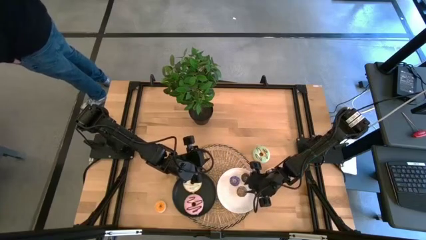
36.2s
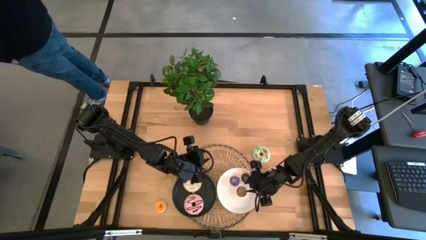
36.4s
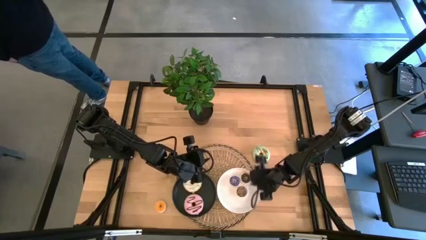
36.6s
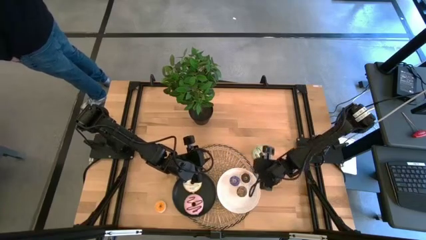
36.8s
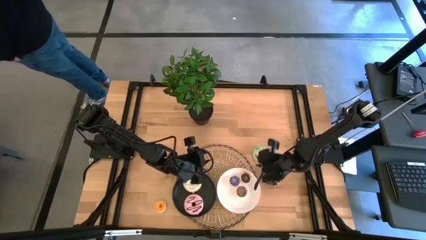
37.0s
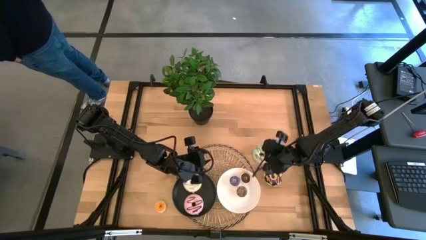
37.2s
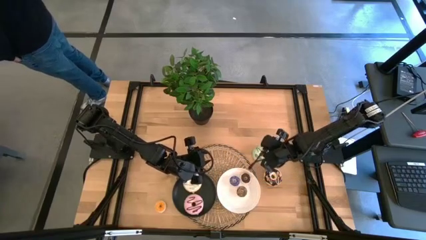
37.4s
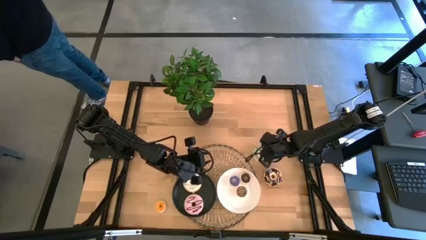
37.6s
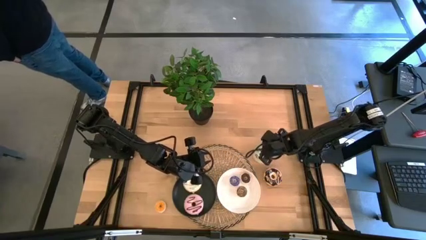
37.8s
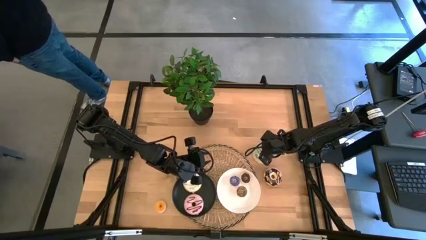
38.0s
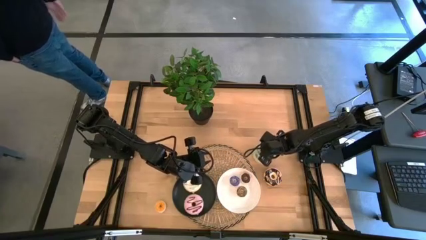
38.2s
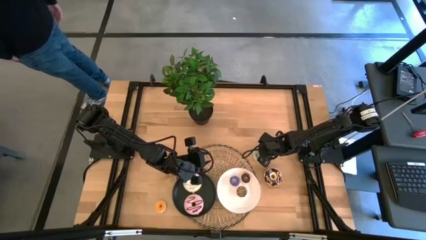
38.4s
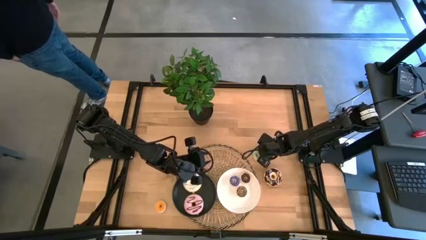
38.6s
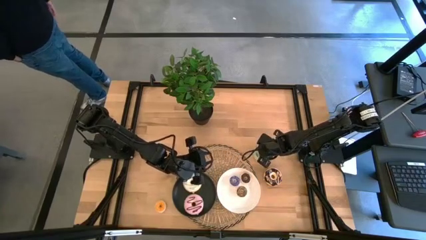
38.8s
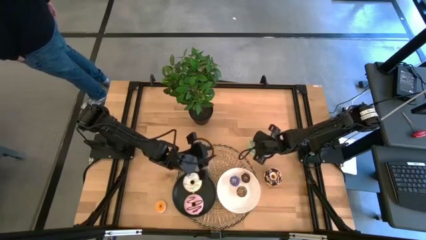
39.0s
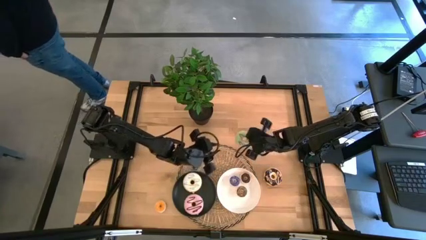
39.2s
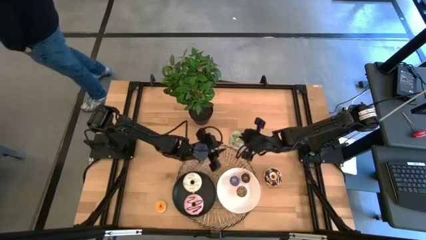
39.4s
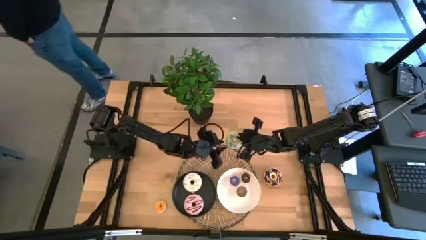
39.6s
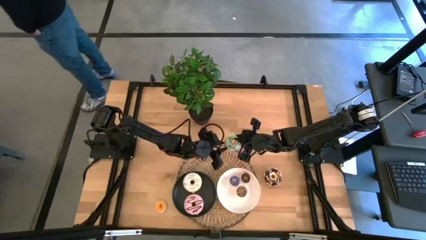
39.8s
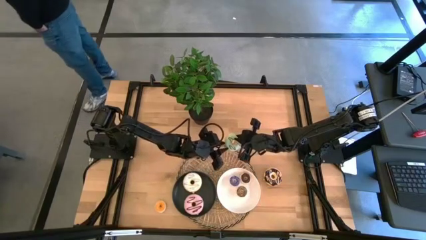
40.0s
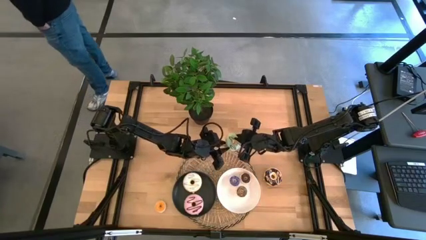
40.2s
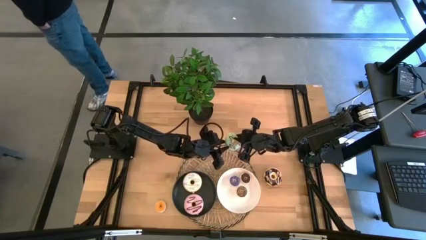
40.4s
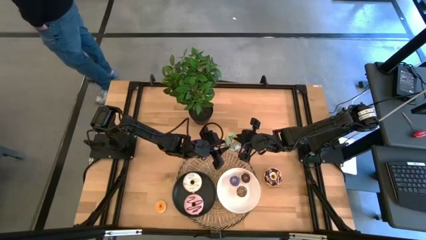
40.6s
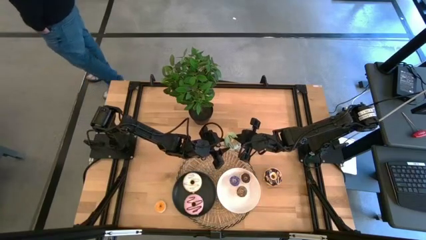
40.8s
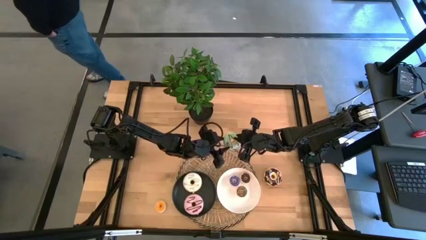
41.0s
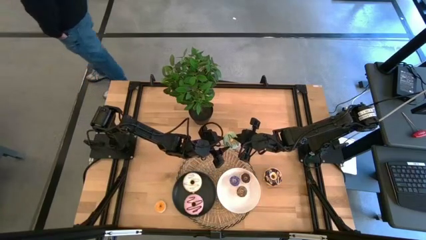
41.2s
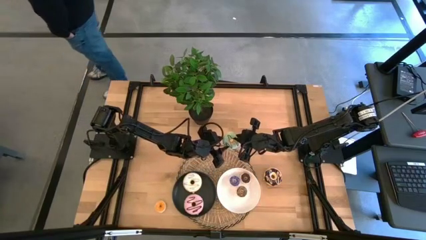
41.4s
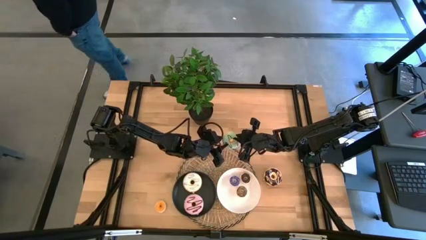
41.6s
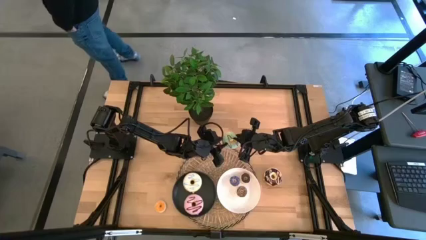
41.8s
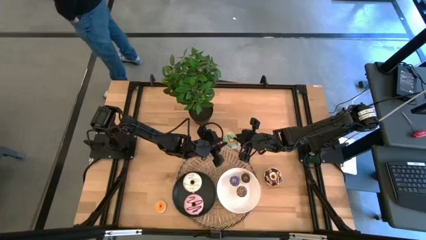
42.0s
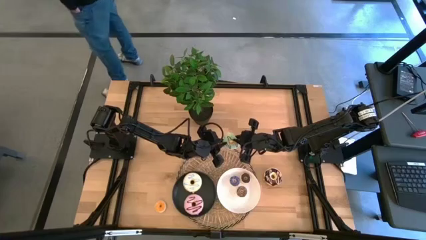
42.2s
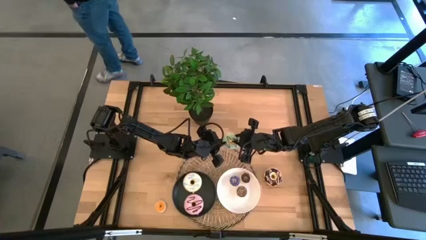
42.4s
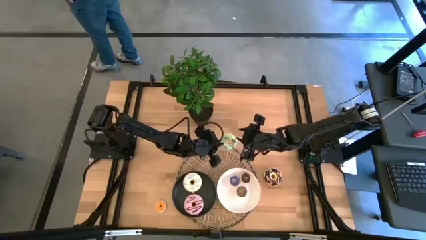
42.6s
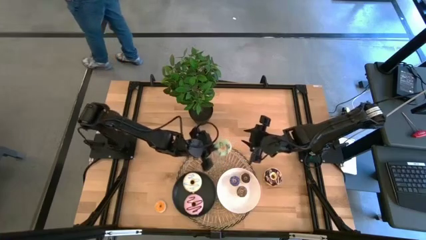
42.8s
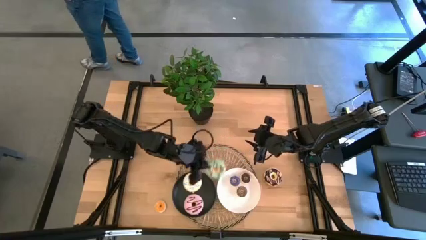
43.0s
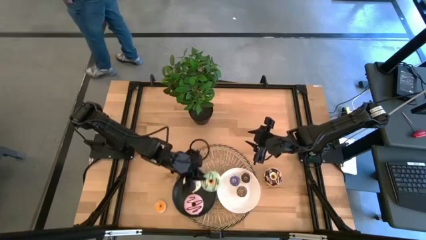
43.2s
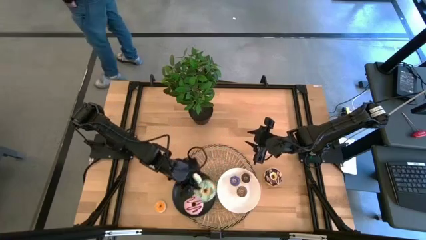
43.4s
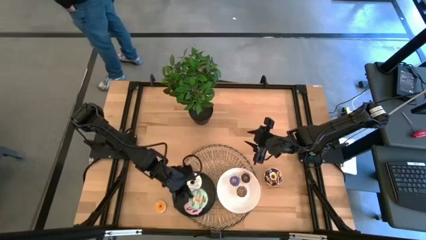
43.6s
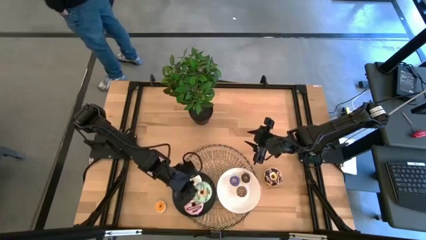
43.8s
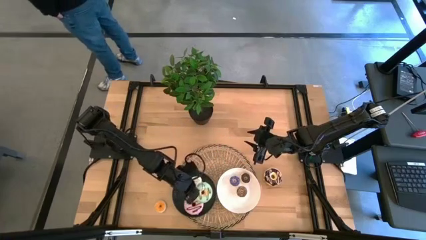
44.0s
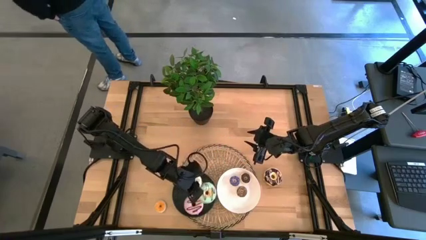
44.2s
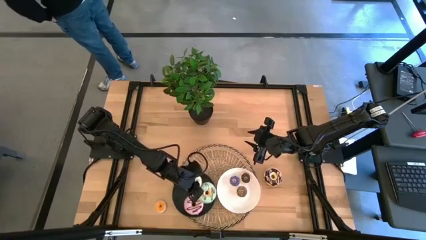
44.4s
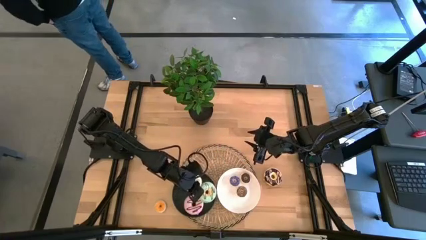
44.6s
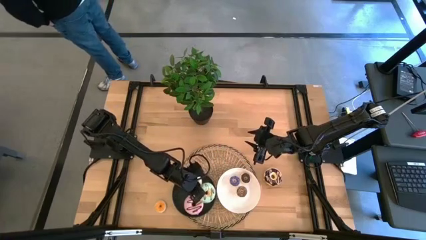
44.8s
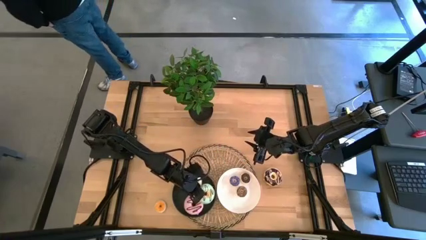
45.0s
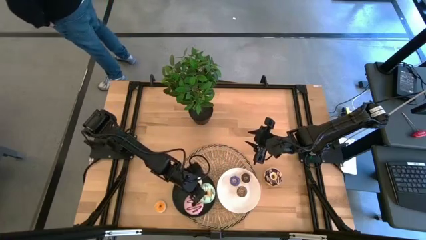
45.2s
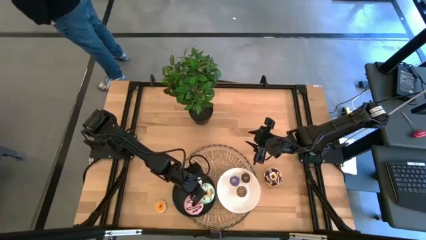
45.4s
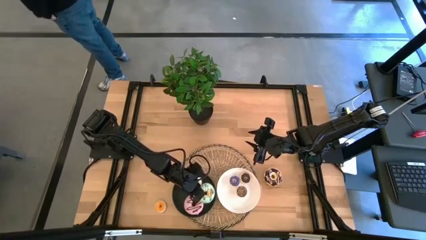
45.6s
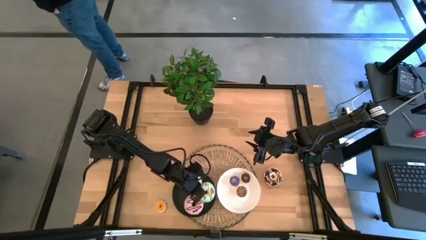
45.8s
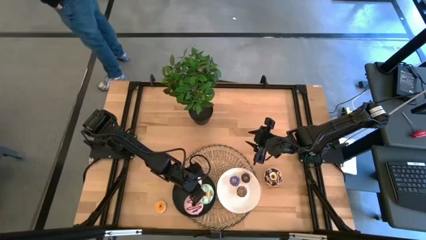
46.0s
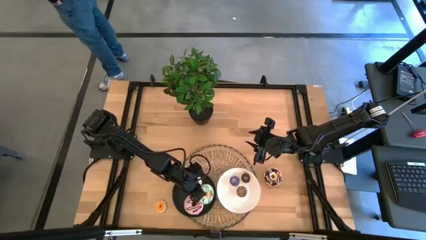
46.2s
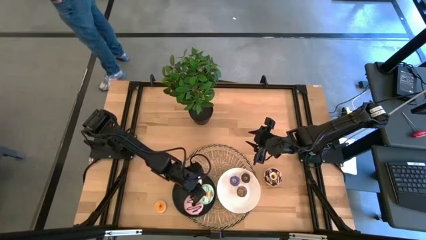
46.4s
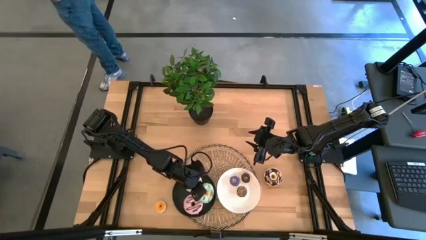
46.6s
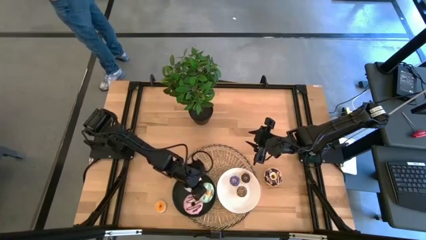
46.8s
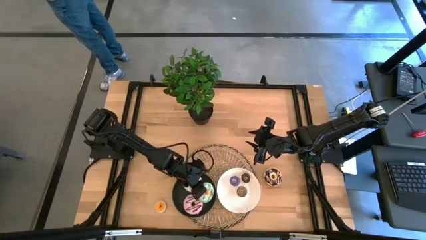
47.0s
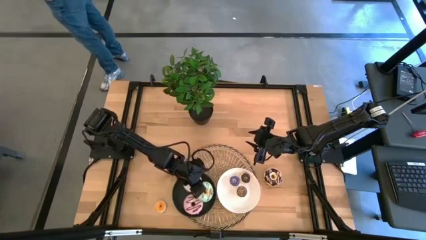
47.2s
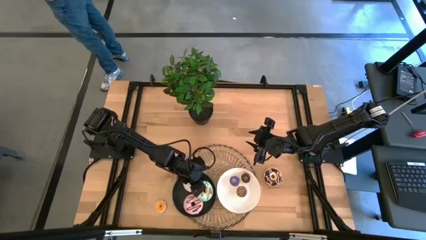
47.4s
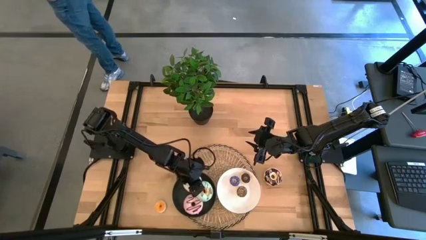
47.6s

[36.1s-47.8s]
Task: Pick & Place donuts
Put the large green donut on the black plate
